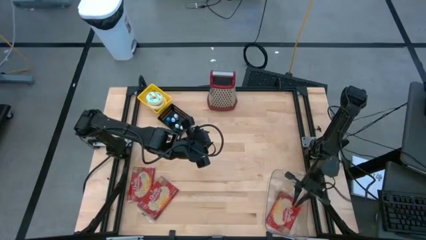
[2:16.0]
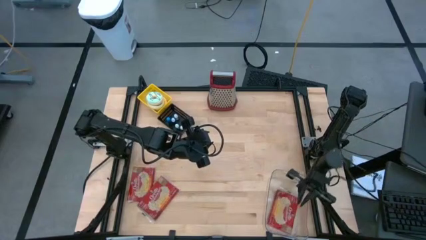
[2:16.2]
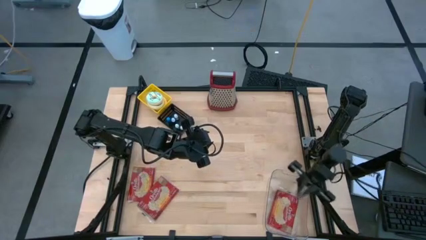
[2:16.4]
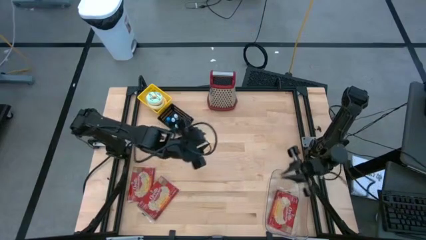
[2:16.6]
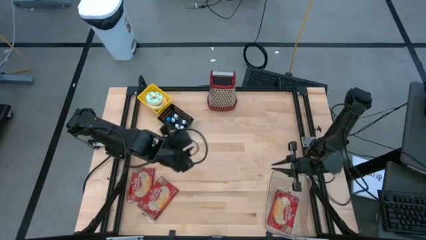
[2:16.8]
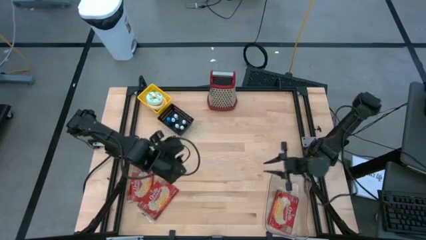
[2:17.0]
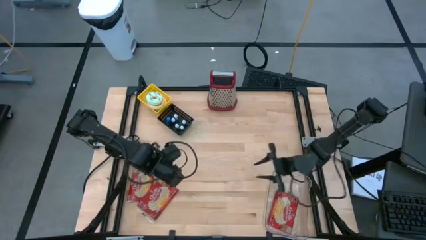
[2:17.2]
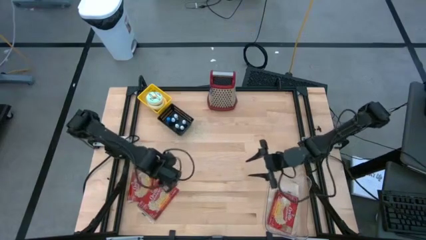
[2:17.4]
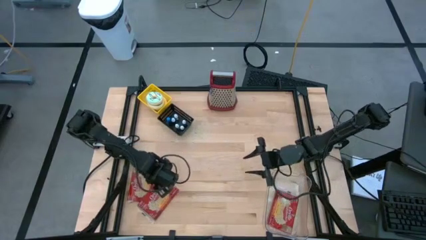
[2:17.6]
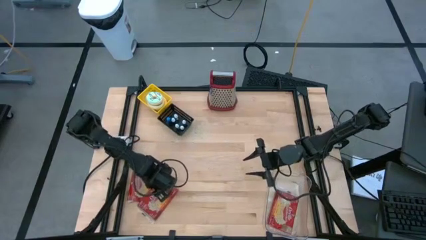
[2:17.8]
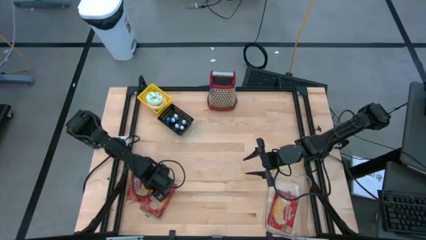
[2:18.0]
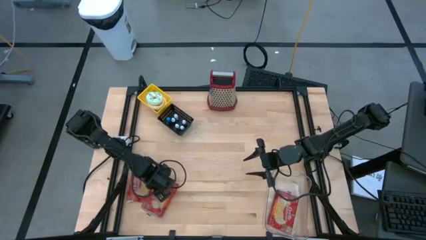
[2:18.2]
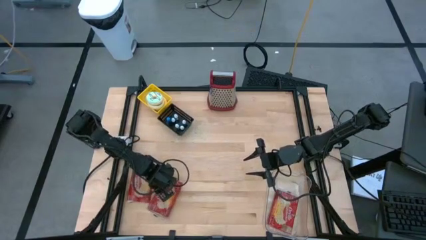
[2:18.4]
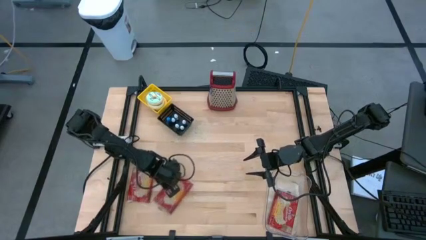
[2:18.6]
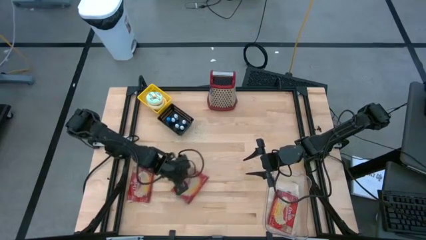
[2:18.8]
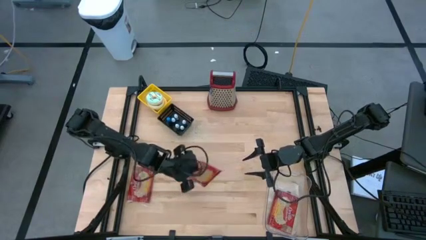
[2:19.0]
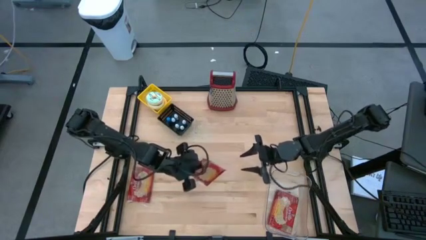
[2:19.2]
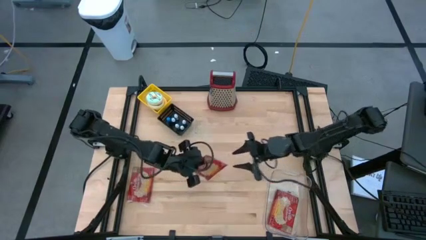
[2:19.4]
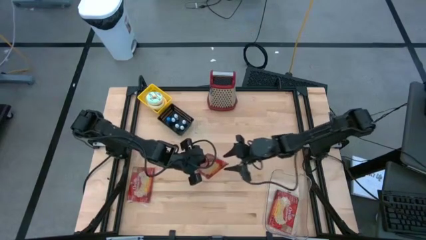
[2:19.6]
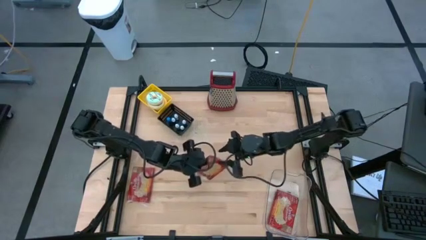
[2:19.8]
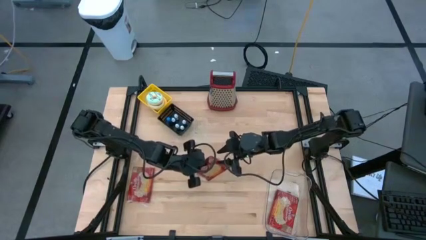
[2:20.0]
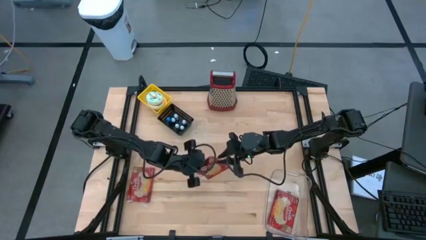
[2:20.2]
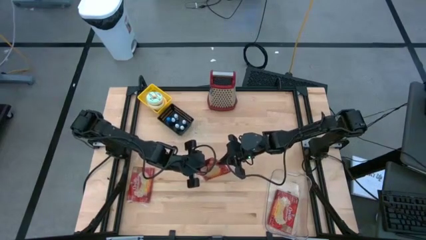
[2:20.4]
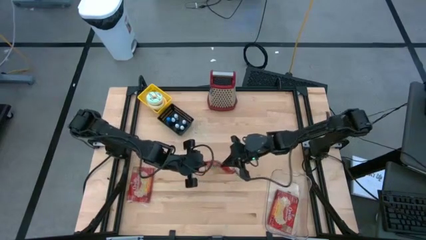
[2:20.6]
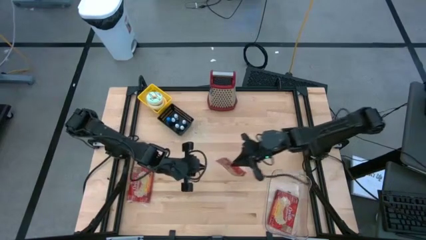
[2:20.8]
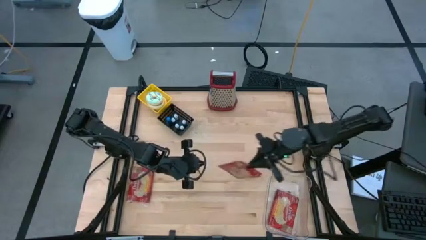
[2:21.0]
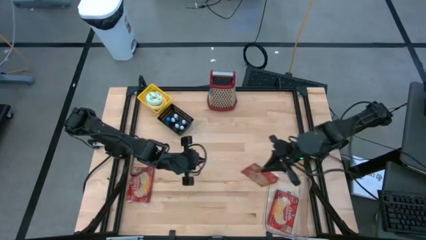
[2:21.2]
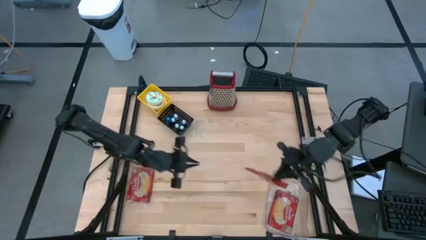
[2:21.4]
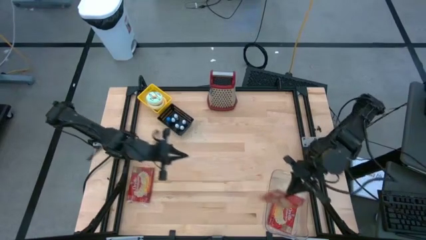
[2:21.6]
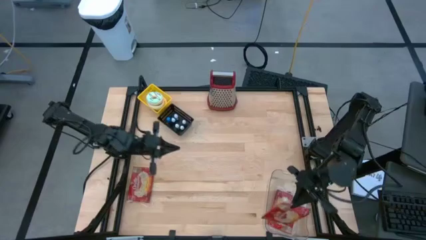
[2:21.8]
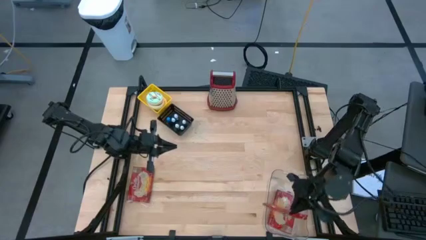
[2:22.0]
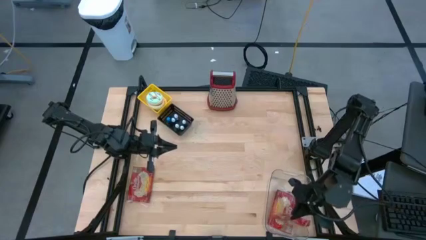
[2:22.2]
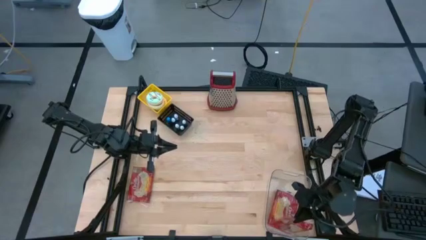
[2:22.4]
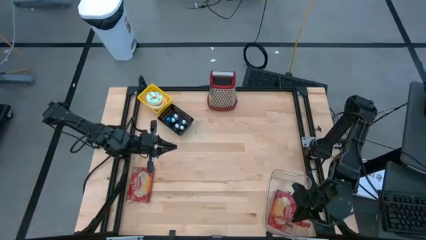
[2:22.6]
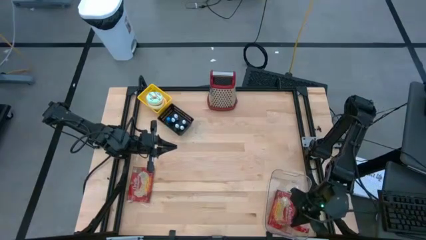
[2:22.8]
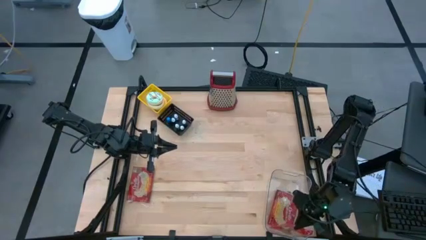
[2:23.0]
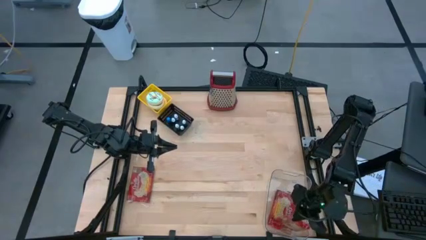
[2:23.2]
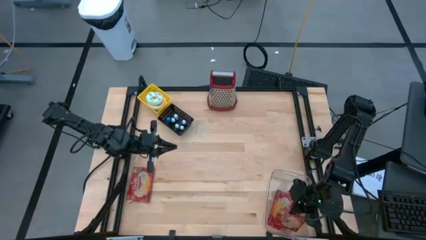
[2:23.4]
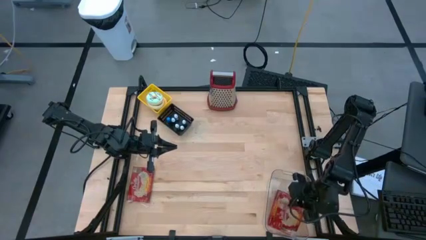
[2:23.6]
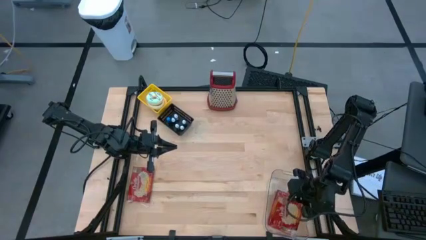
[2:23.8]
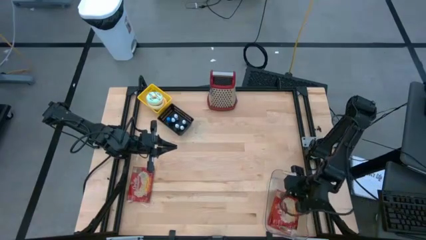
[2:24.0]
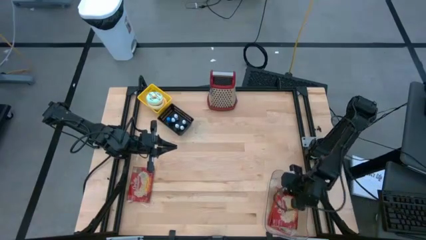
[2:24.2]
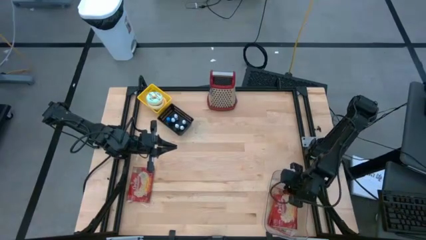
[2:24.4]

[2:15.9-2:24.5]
Put the right red popcorn bag into the transparent bin

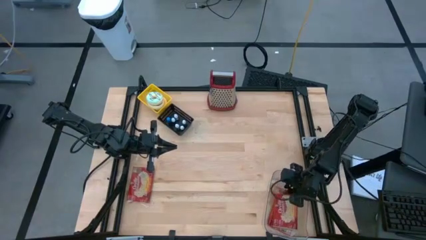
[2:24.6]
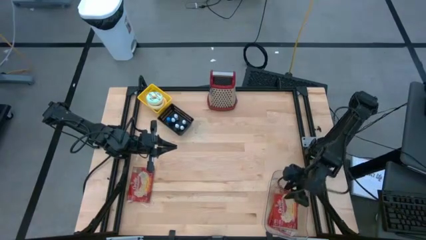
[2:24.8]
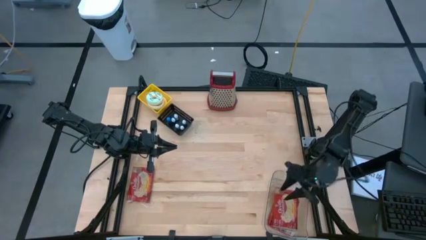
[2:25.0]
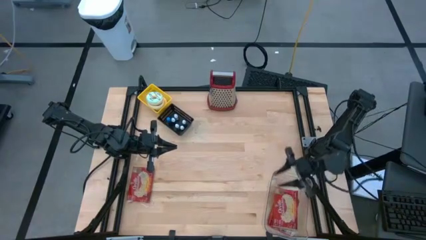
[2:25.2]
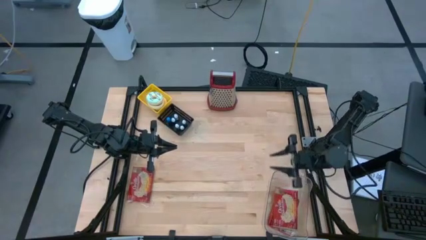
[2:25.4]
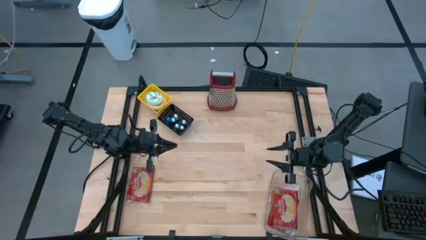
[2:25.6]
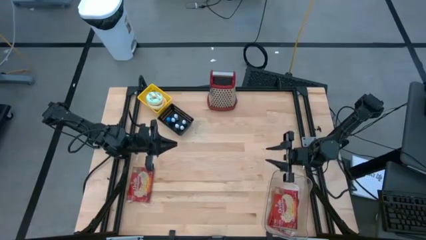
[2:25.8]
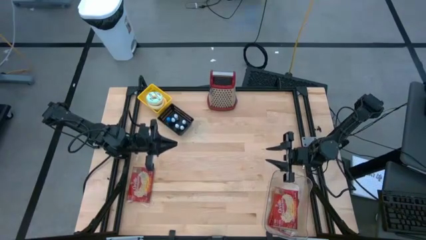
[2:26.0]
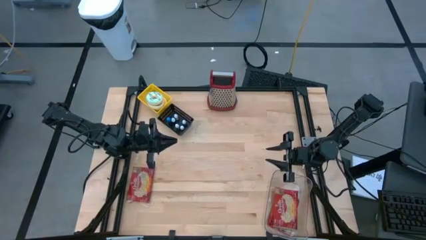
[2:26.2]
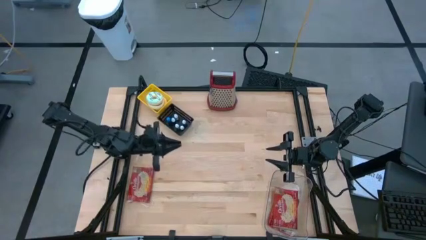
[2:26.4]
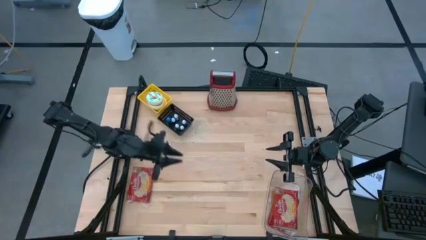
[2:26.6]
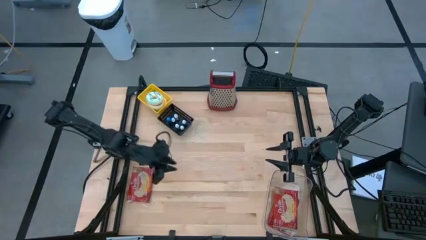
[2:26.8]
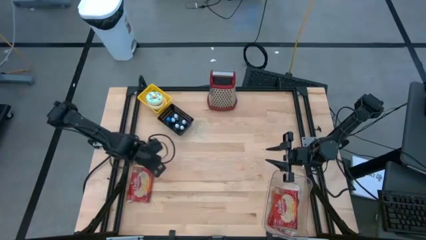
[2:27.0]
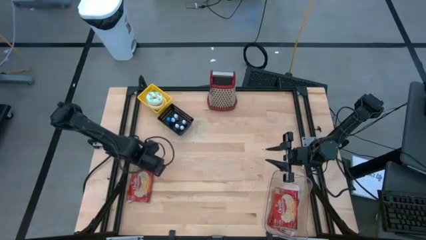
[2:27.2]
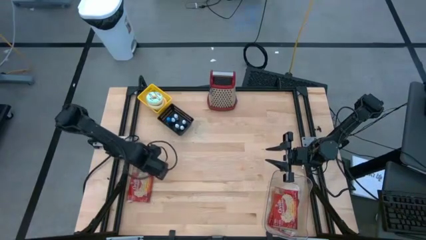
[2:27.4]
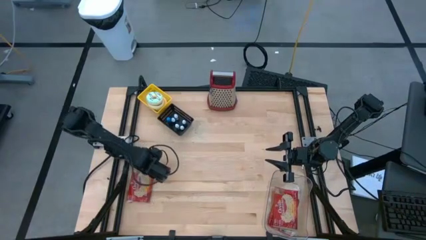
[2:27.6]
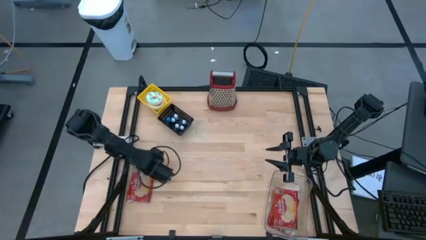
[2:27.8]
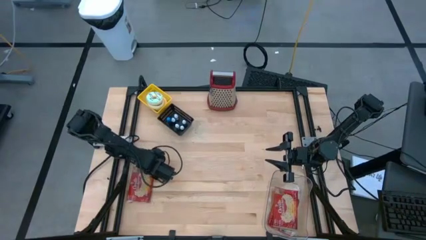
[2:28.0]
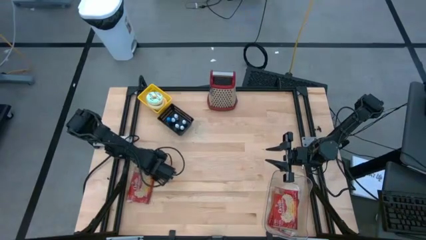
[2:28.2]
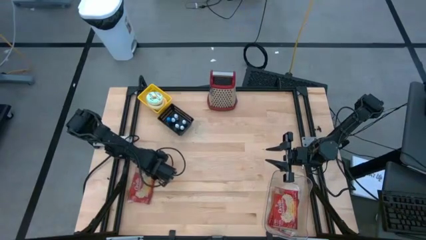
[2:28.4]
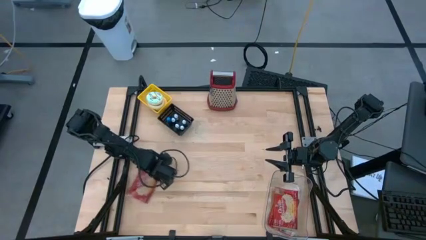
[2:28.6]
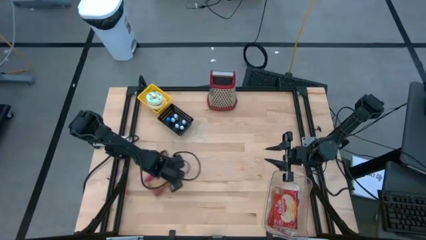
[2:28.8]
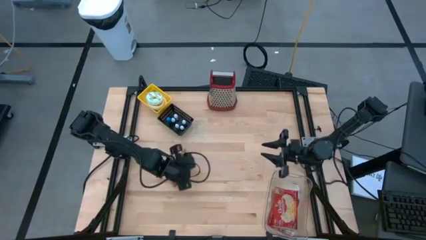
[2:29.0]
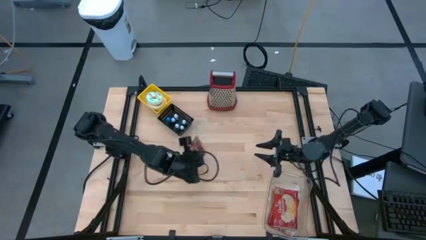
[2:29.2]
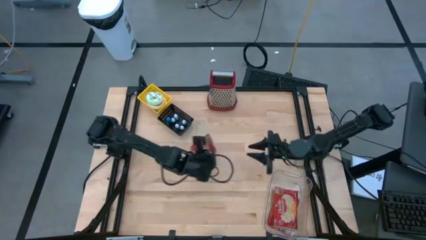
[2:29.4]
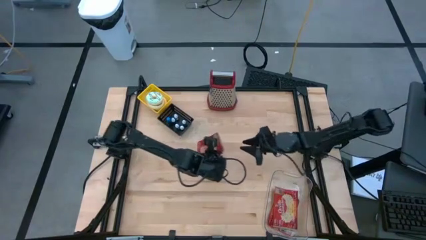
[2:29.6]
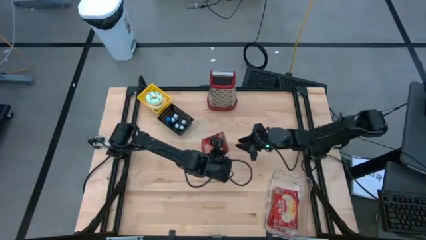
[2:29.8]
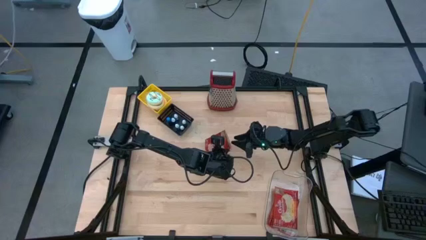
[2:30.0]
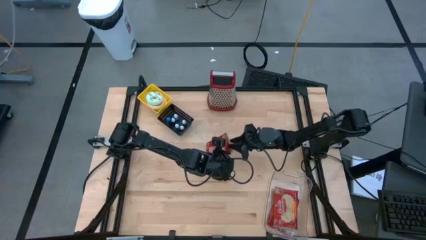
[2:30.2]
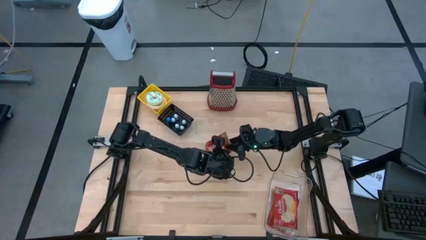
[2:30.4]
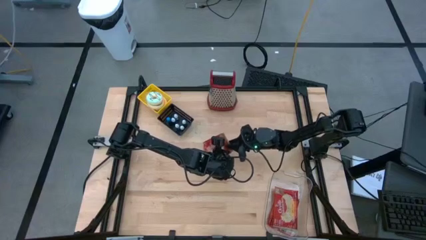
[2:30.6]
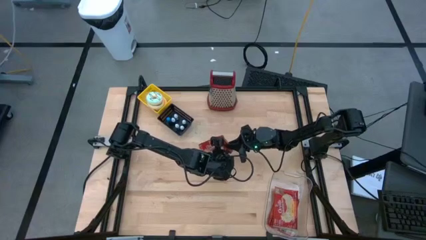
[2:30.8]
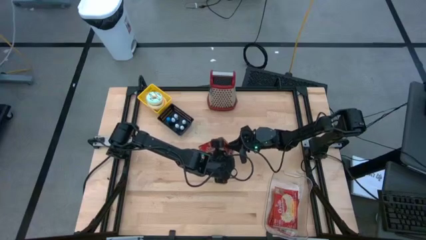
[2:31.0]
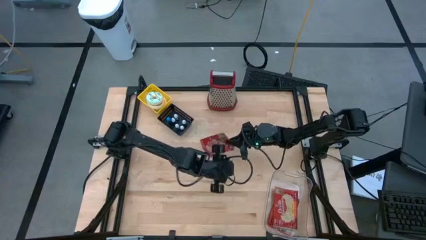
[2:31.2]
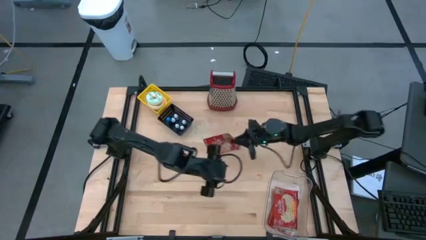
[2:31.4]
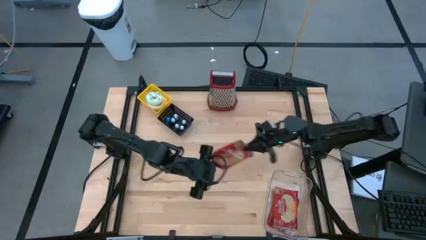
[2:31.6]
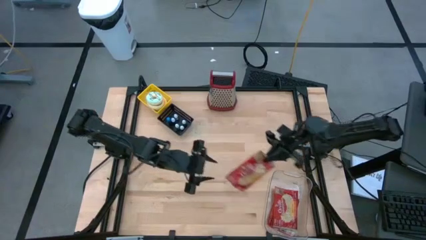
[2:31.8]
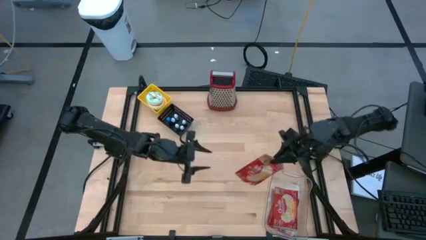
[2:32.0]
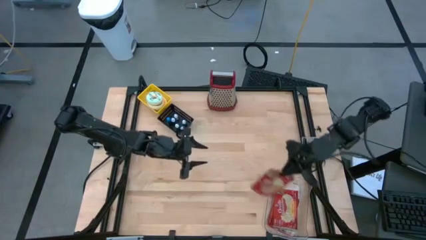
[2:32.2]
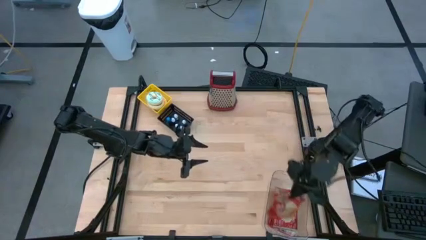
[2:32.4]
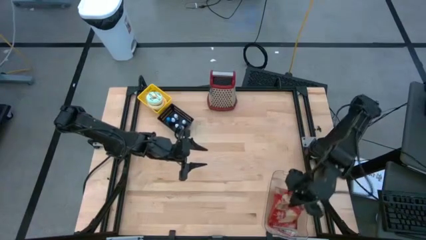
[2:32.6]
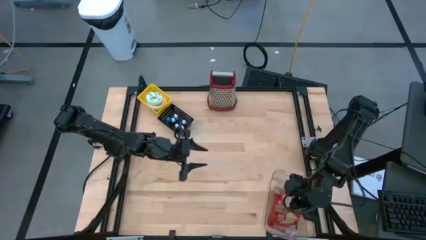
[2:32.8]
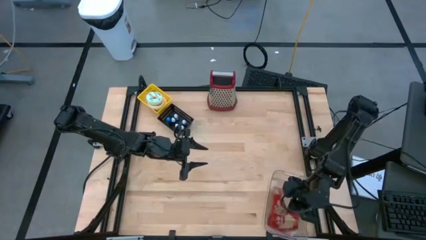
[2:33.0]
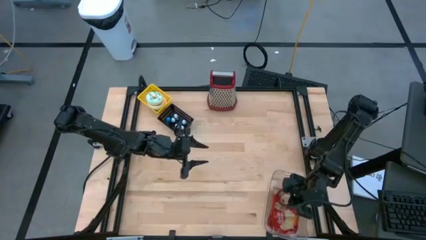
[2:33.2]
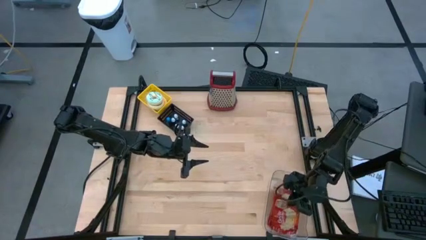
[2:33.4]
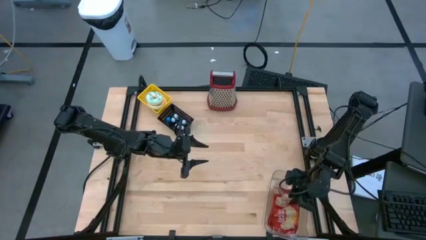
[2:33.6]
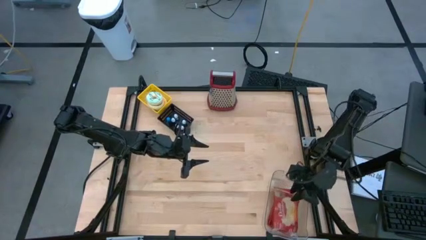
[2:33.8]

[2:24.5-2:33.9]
Put the red popcorn bag into the transparent bin
